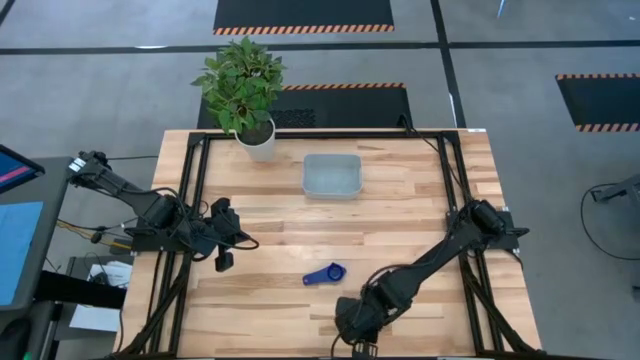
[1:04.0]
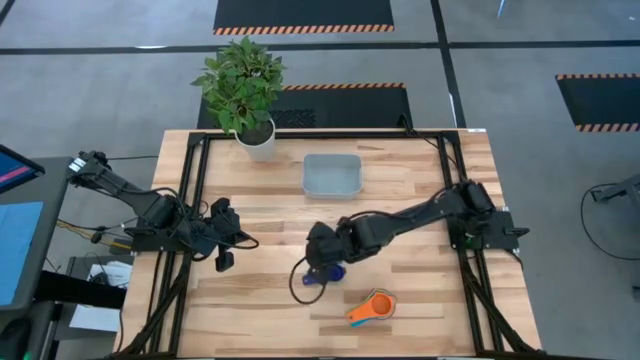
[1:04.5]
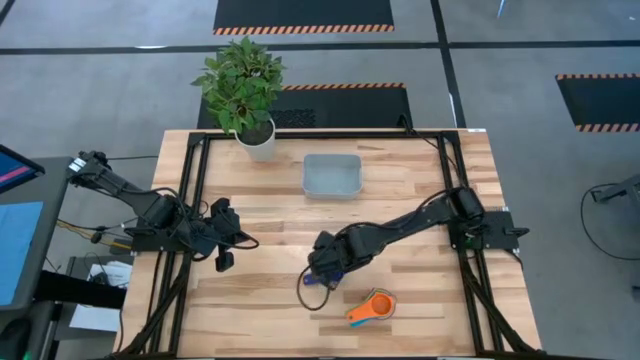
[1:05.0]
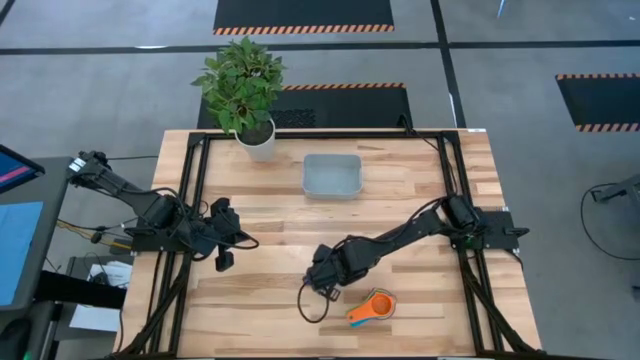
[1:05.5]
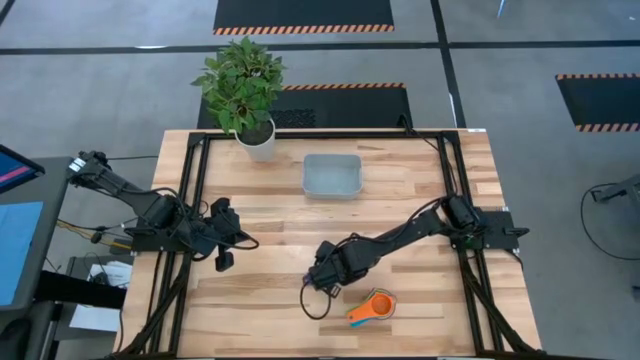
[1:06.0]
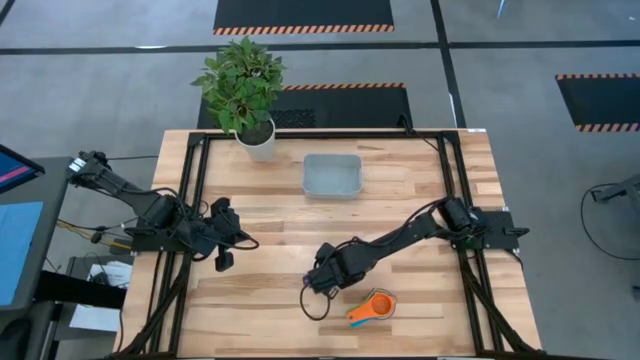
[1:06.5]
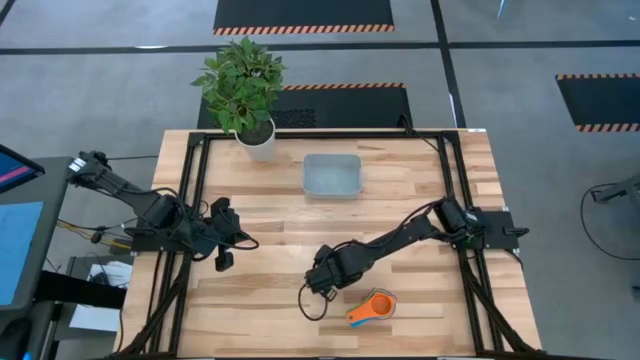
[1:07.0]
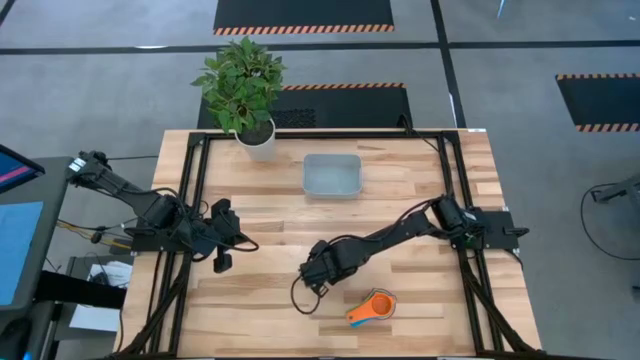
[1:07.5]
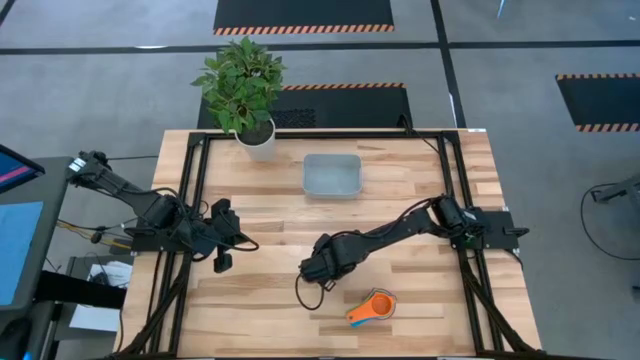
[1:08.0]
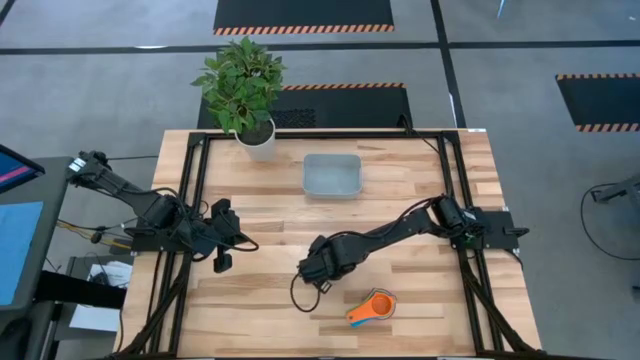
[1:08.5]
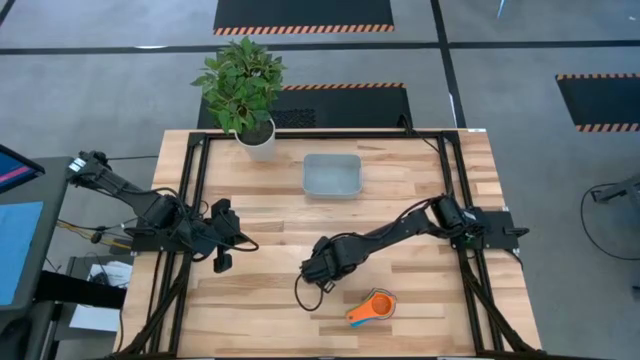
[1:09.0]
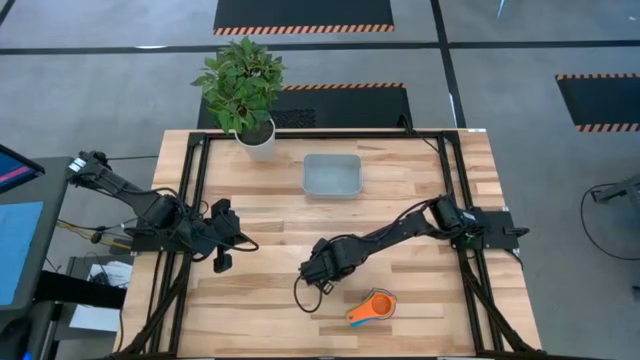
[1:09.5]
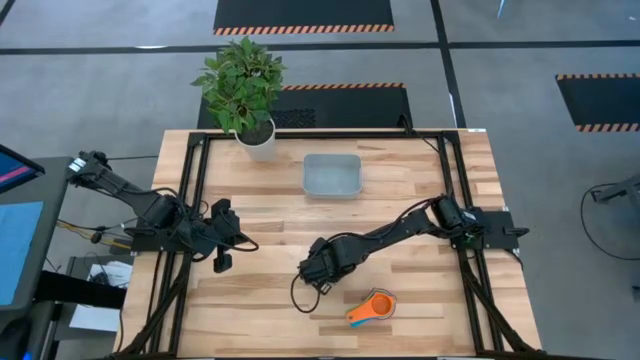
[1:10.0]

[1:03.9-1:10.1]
Task: Nest measuring cups in basket
Stack the dark blue measuring cup on top of the orange measuring cup

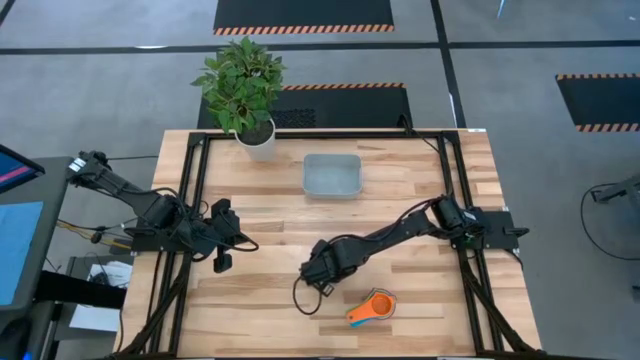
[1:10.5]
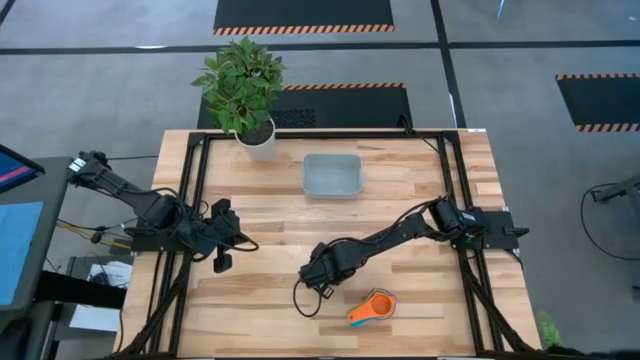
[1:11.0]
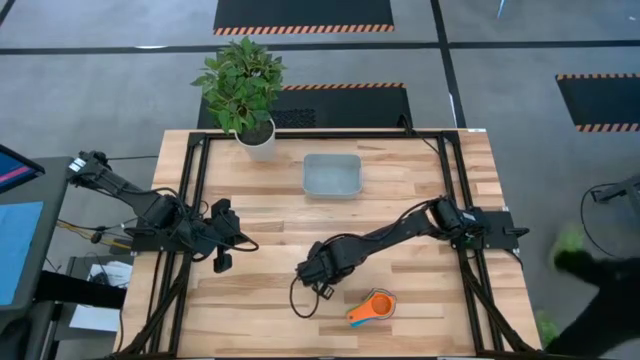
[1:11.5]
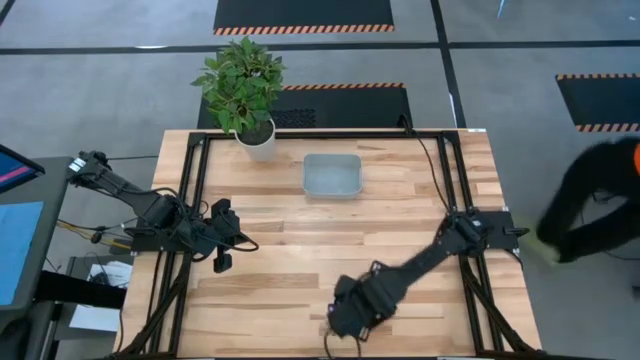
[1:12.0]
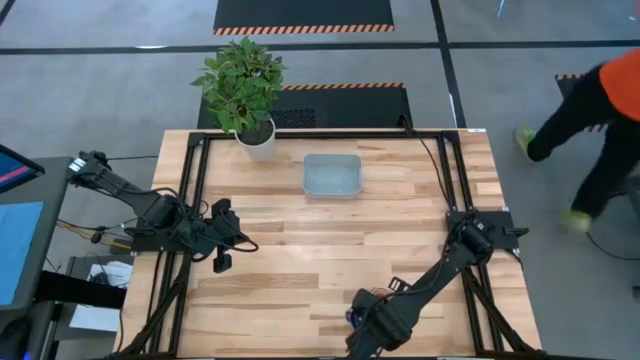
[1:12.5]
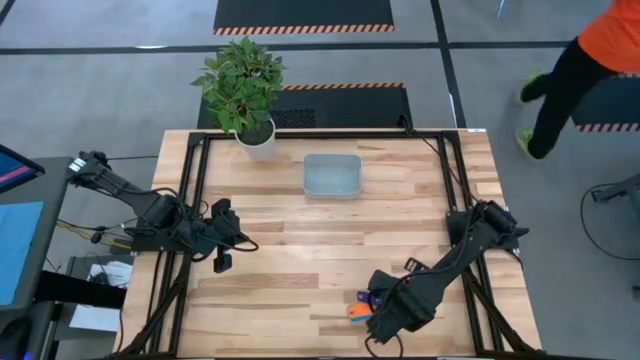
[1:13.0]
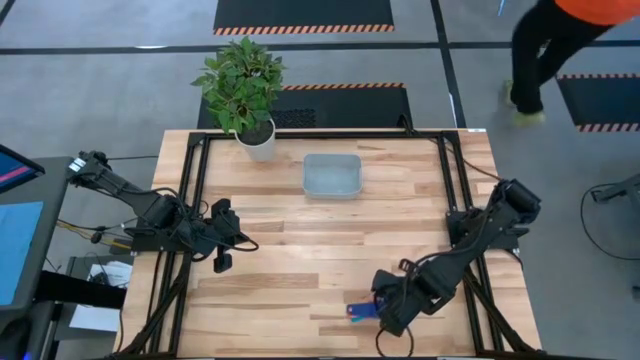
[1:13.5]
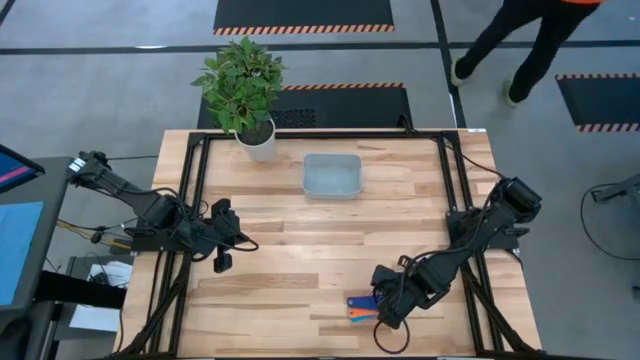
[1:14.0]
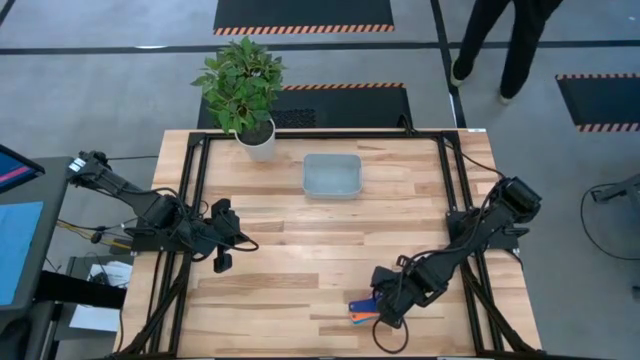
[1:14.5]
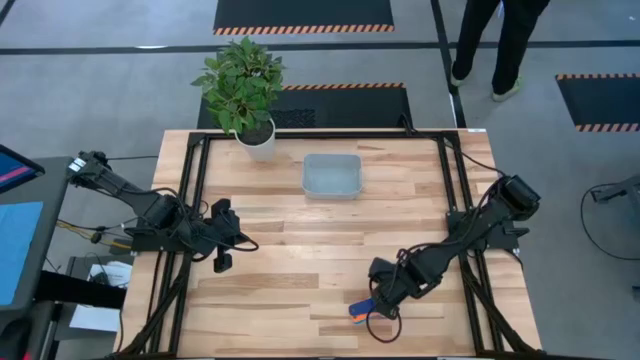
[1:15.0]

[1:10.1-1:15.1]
Stack the dark blue measuring cup on top of the orange measuring cup

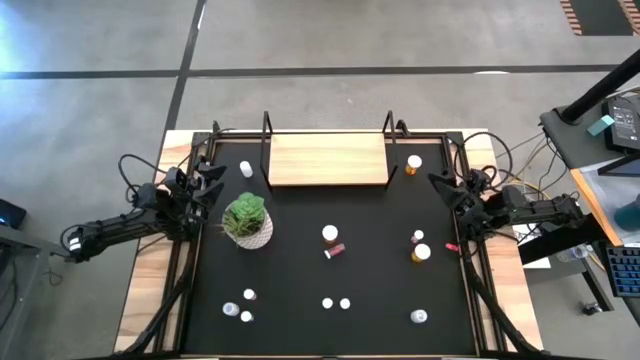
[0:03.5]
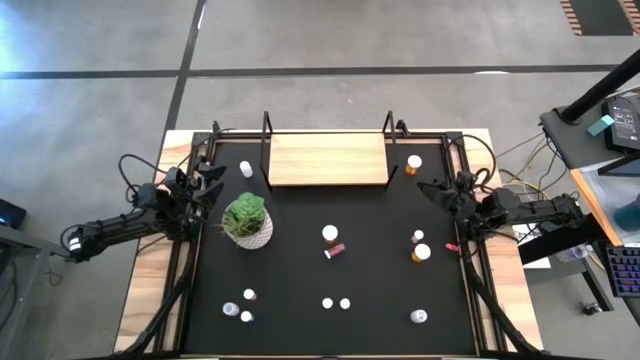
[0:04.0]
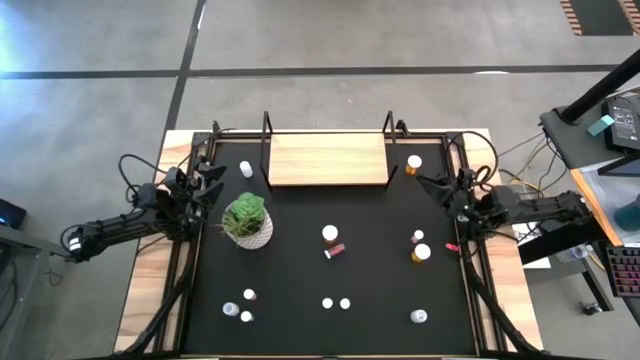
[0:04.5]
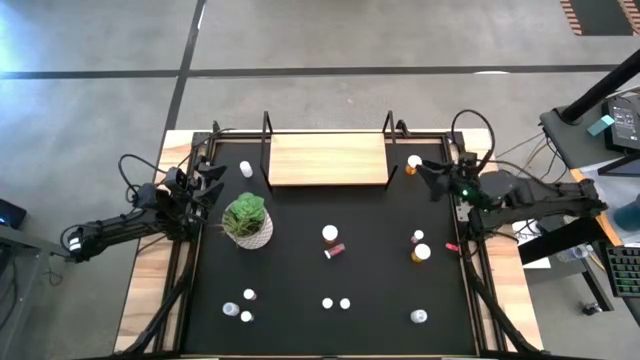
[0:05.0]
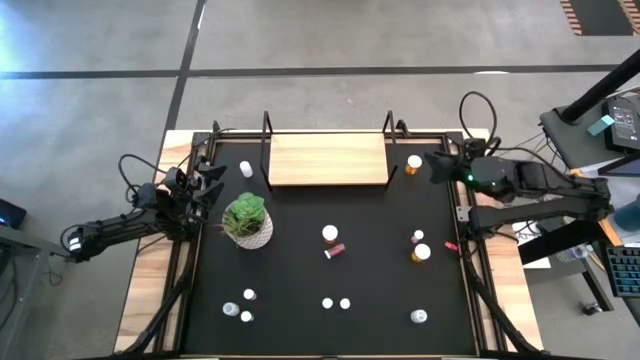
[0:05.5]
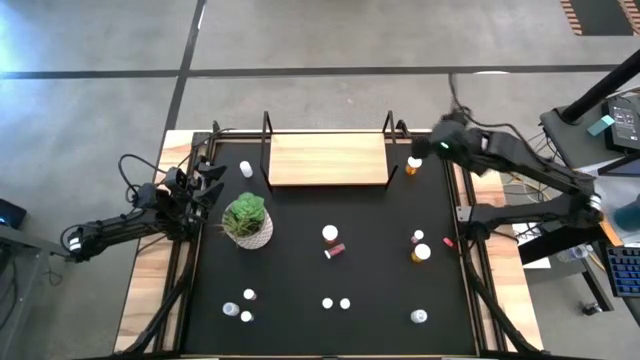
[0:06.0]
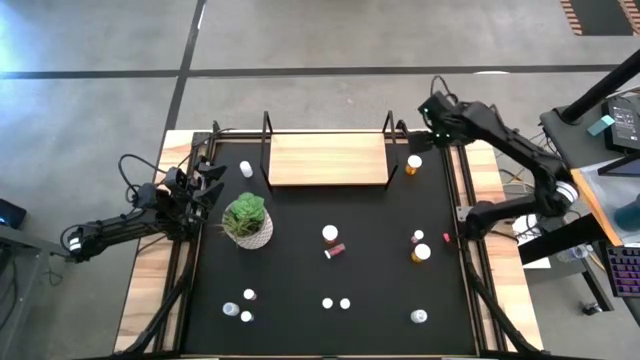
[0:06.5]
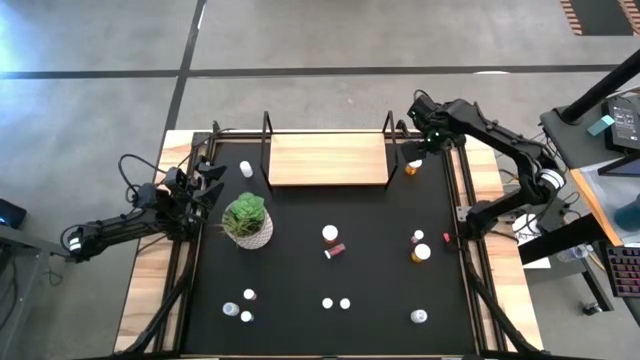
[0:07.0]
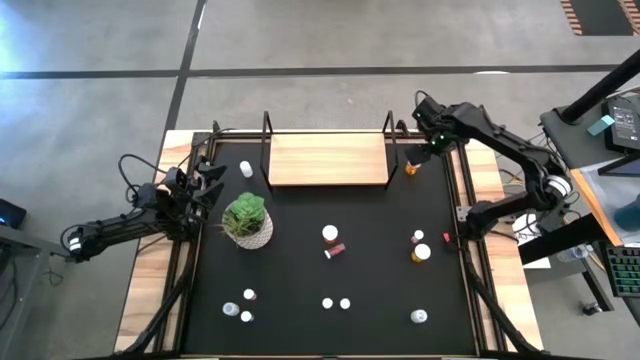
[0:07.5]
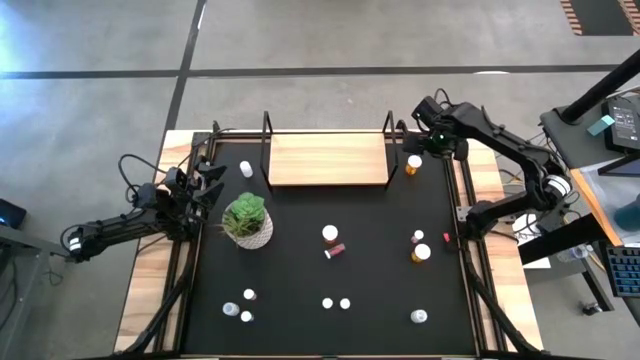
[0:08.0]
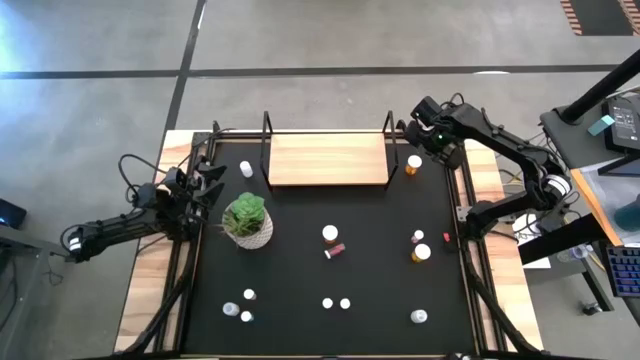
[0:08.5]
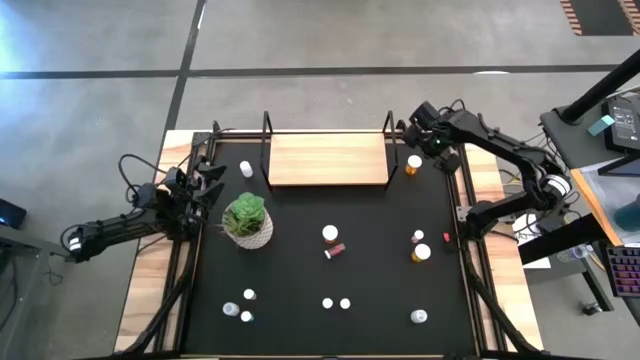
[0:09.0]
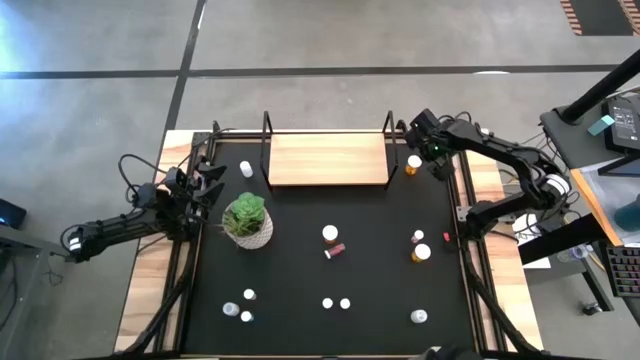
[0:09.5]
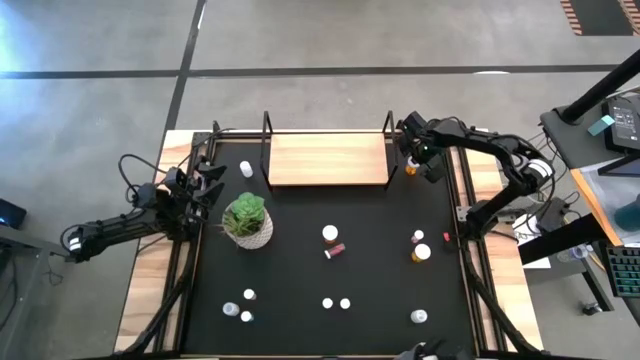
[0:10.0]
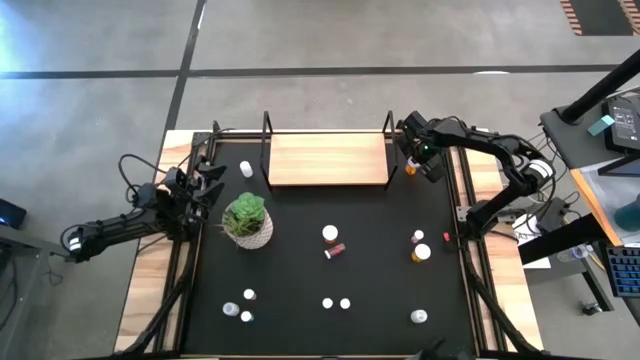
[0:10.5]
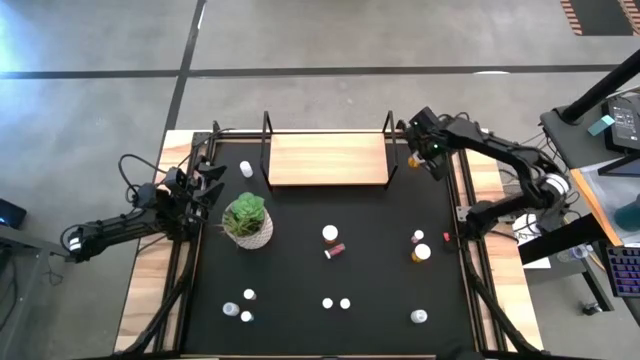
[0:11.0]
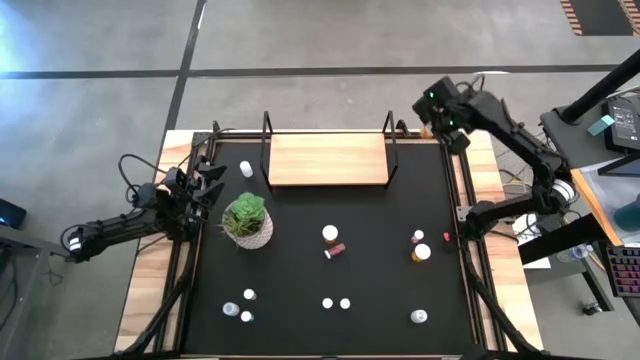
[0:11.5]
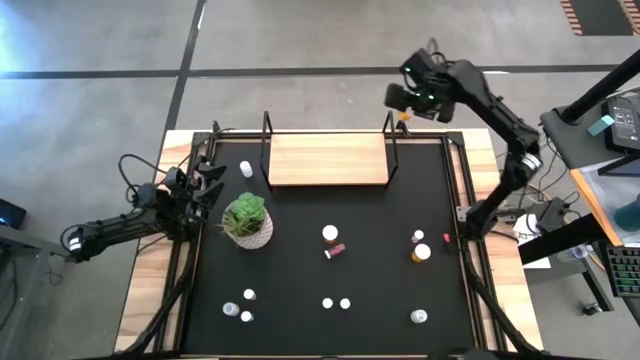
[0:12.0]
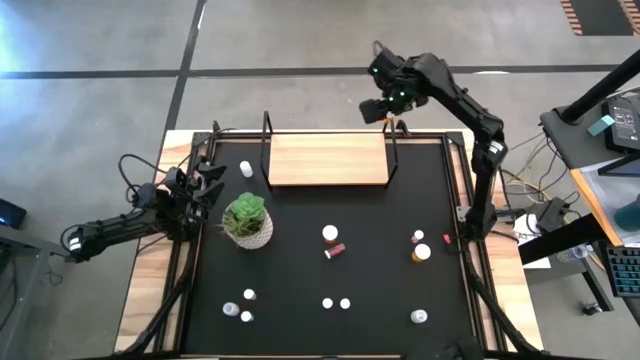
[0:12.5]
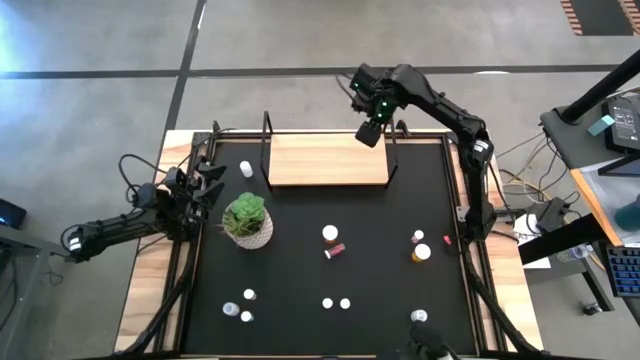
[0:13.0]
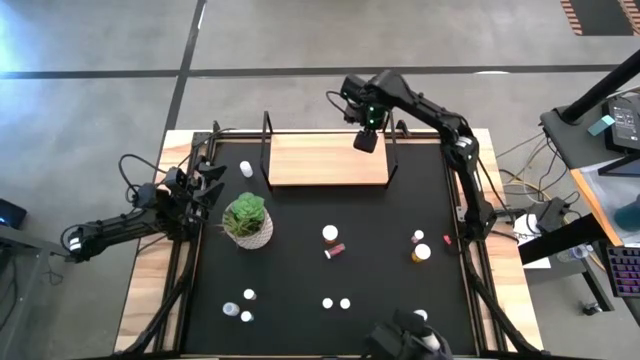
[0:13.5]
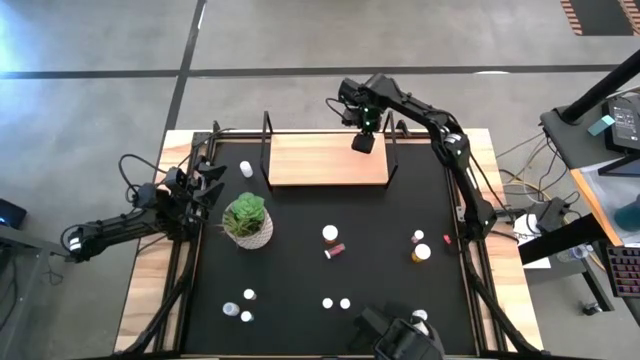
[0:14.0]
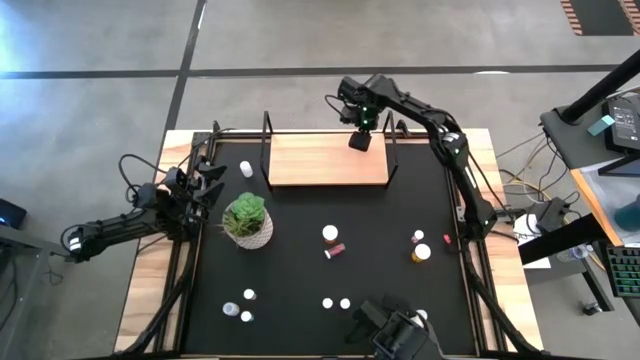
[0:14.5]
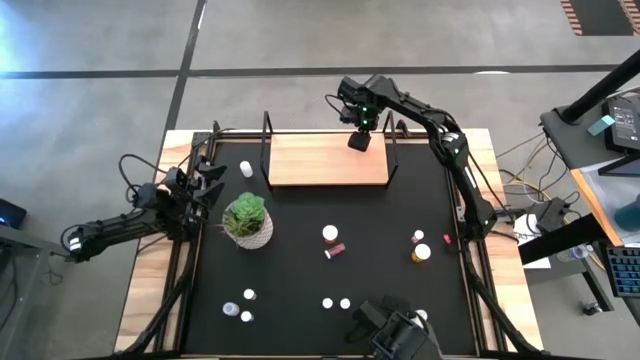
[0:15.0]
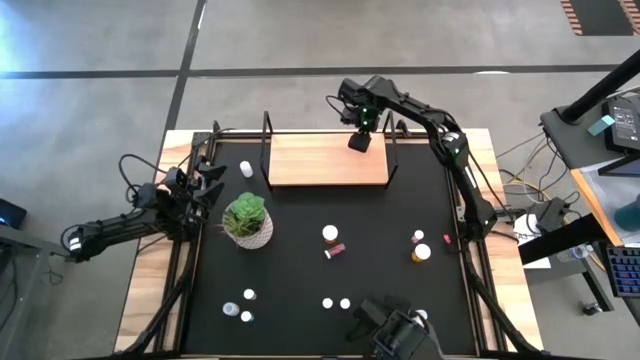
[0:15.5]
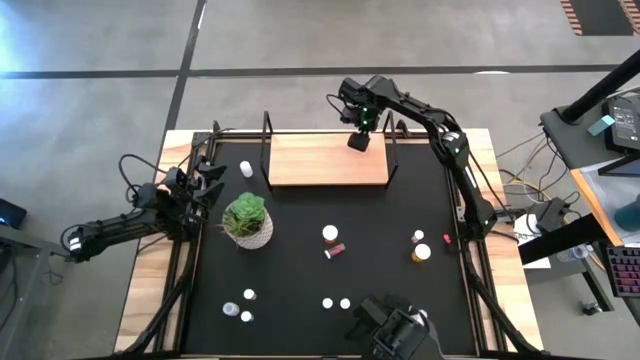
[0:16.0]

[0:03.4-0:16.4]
Task: Pick and place medicine bottles onto shelf by color
Put the top orange pill bottle on the shelf
